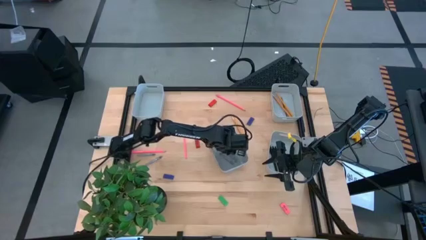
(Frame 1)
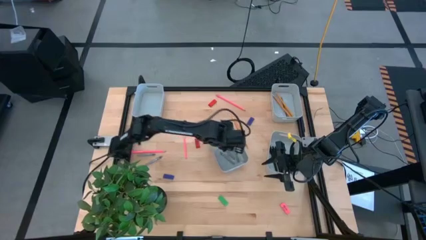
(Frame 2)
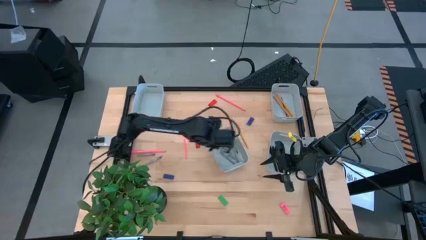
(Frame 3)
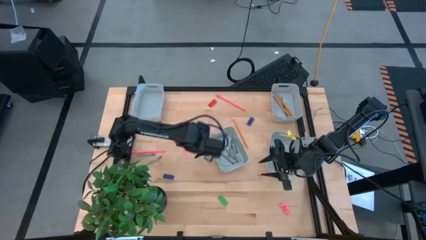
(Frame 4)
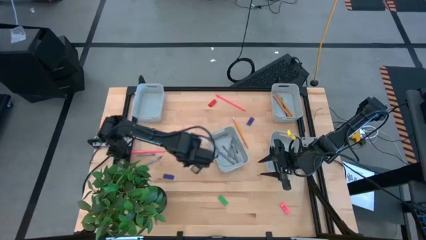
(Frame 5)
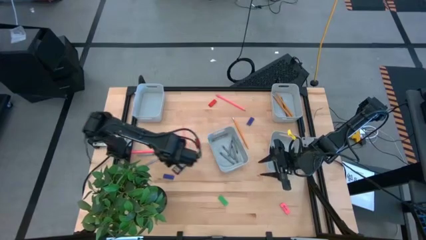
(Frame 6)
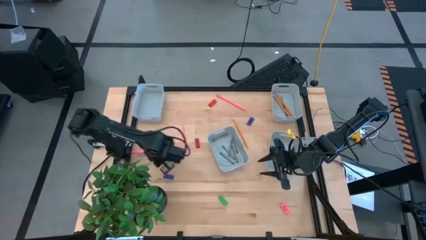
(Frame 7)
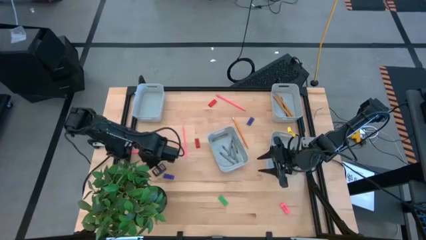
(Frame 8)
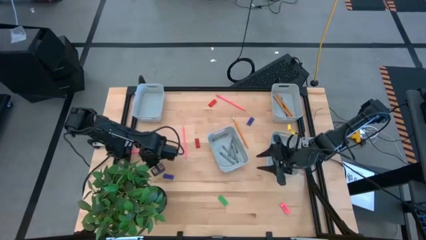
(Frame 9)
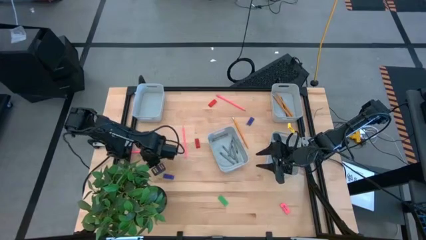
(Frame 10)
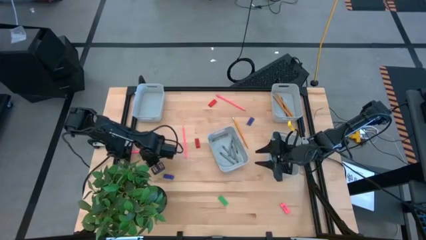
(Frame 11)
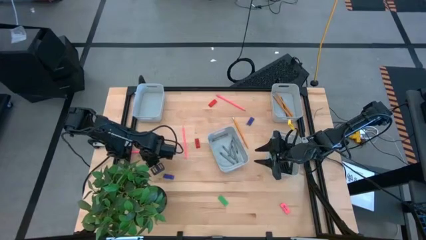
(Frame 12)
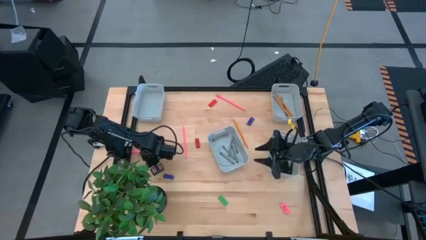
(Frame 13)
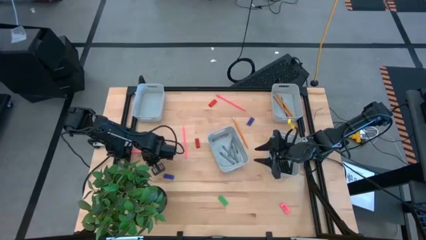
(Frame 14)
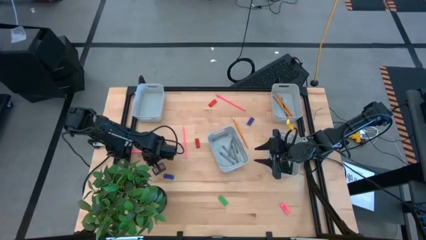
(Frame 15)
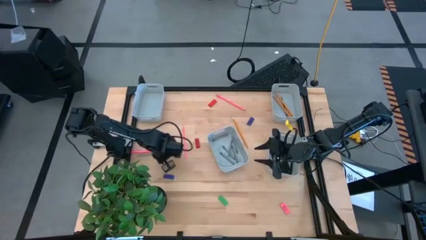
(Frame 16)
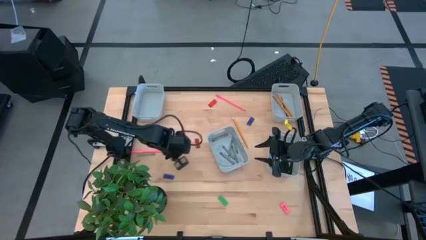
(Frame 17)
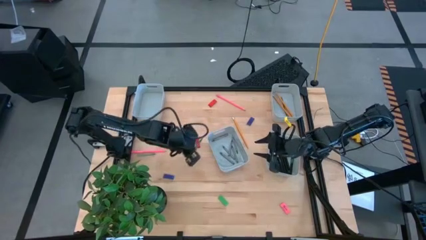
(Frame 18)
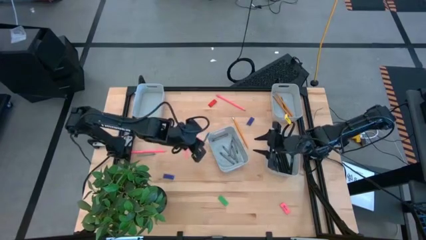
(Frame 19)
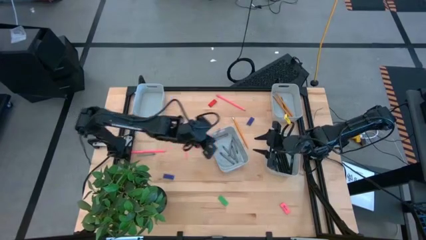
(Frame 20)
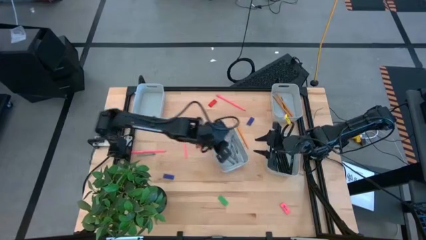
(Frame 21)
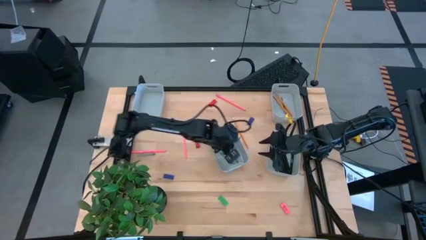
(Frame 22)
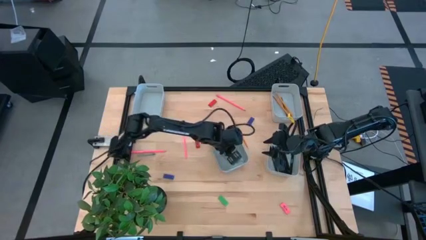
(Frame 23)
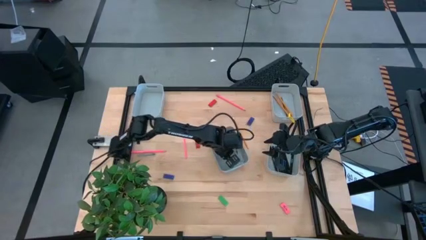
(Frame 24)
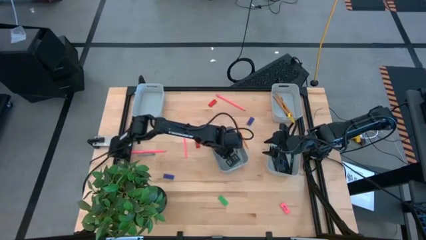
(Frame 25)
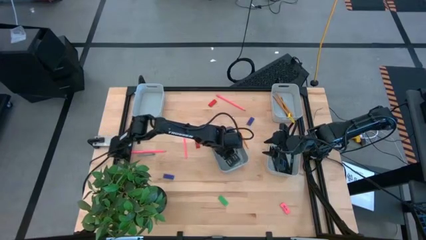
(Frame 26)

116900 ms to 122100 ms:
Task: Sort crayons/erasers/pens/pencils in bins
Put the gray crayon into the bottom left gray bin

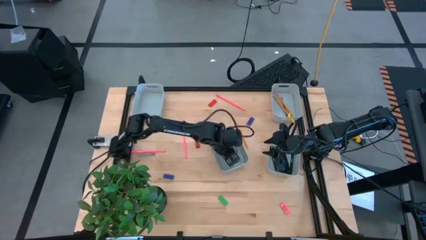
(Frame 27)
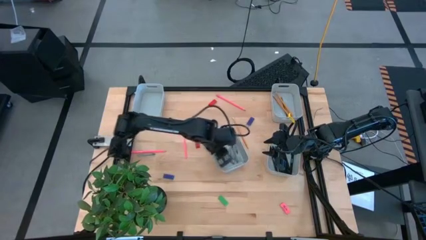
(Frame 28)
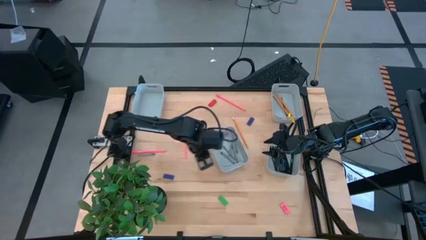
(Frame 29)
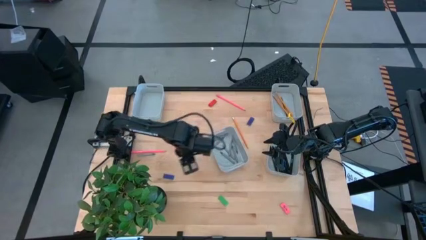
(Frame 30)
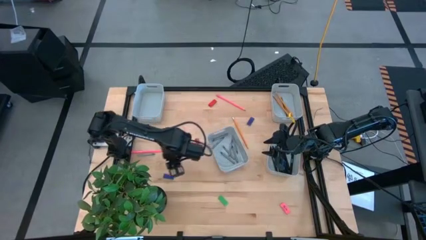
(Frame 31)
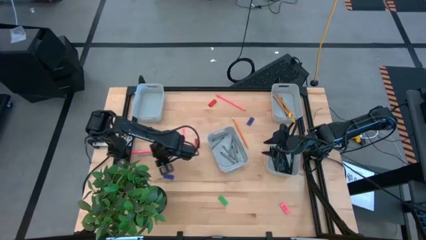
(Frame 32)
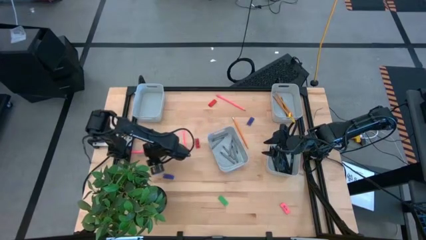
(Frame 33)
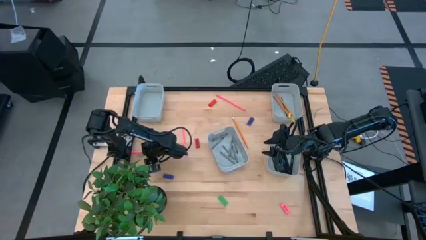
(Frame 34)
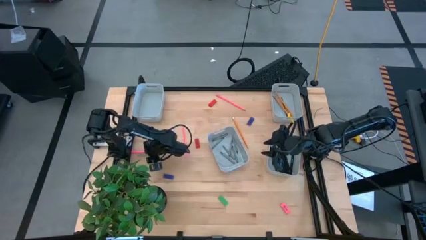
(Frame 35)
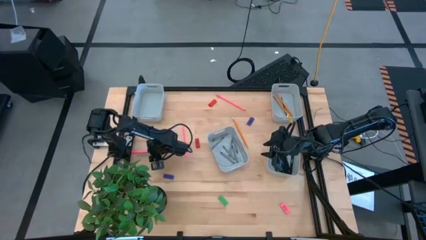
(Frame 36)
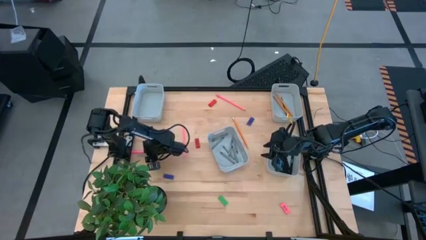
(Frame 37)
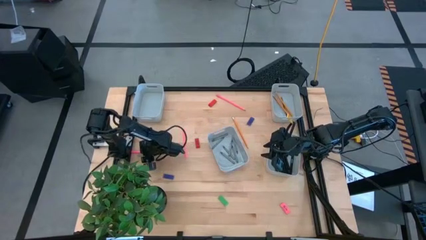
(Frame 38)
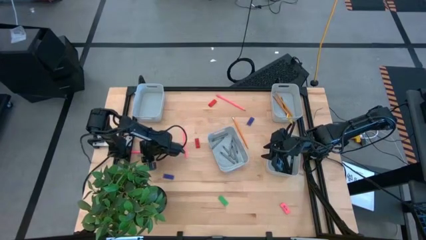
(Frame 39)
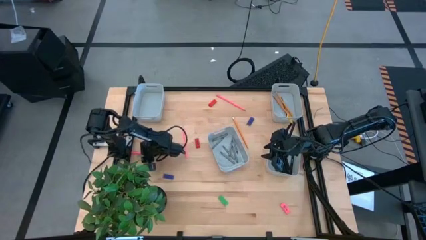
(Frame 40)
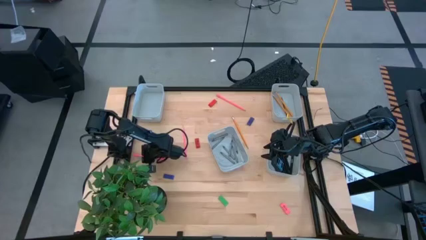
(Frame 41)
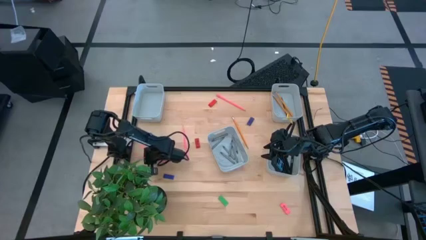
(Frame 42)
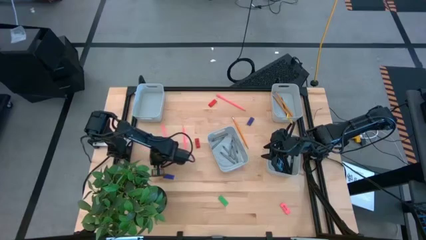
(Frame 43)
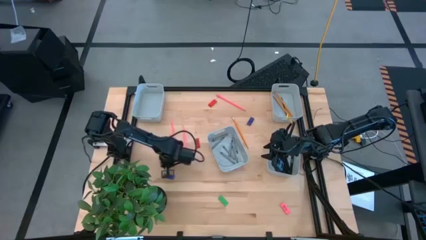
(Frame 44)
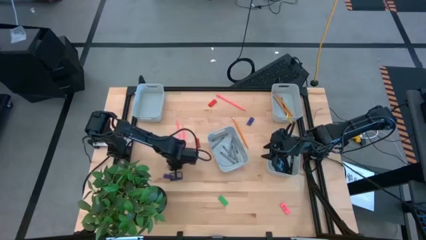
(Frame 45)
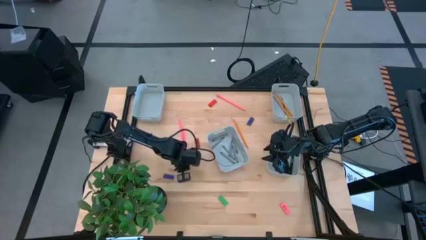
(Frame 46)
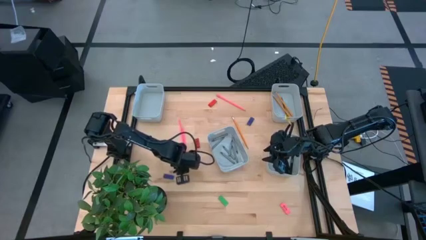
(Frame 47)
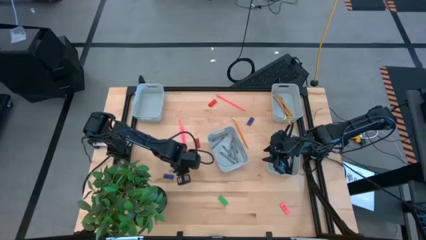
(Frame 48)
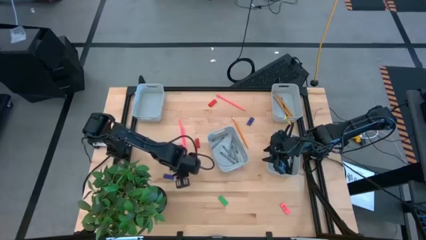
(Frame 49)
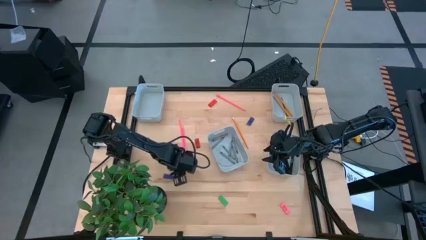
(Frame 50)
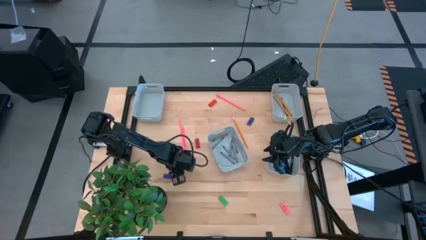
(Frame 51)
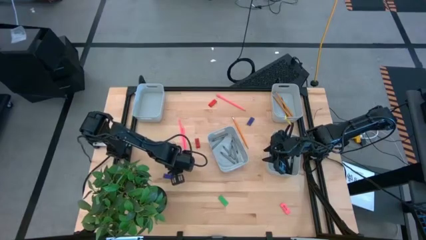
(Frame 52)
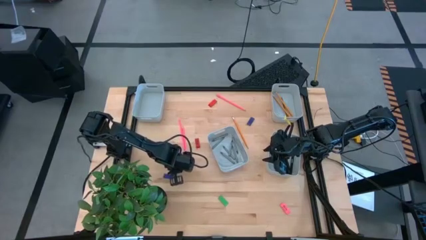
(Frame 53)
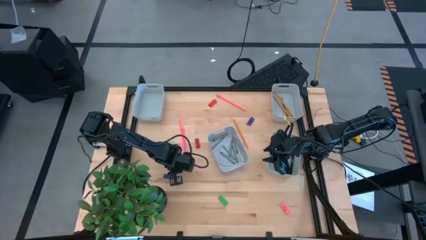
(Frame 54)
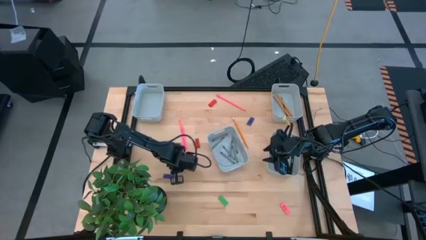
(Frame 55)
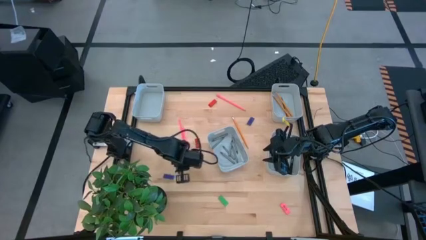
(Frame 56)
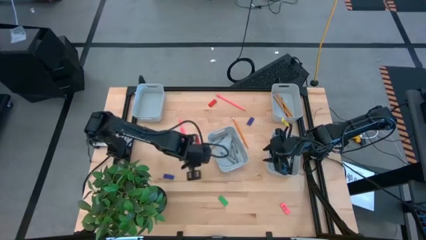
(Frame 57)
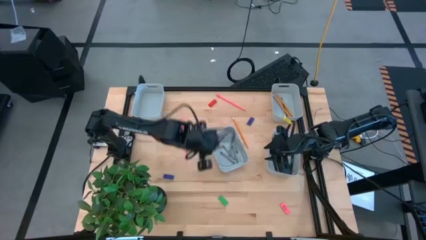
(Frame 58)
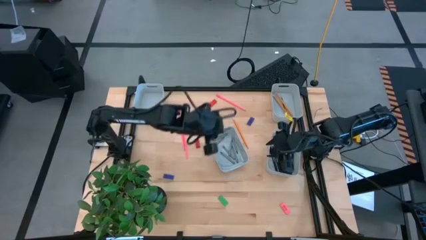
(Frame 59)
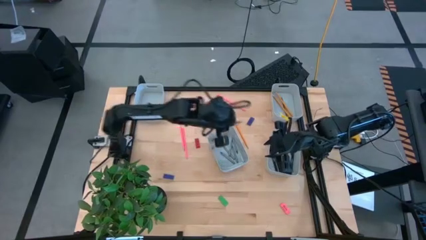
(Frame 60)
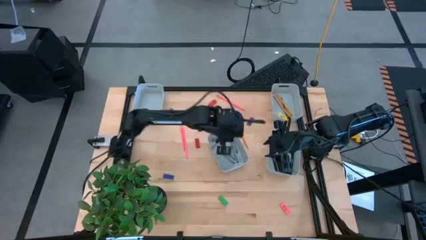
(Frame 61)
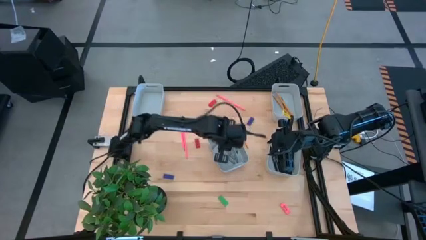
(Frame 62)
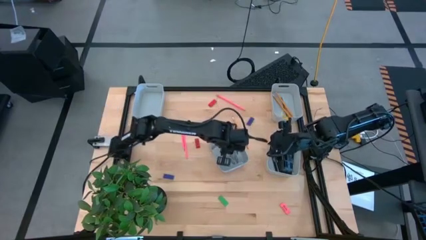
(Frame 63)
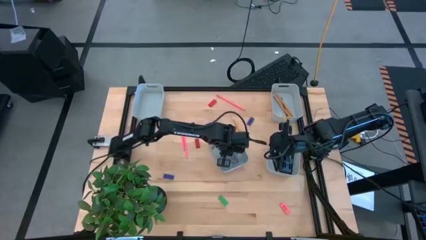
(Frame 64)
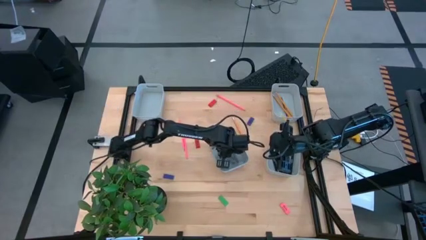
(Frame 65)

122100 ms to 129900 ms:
Put the gray crayon into the bottom left gray bin

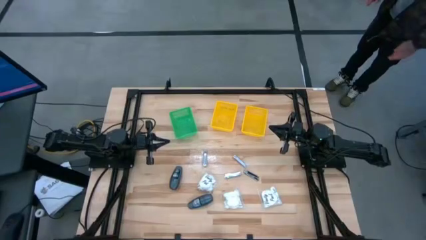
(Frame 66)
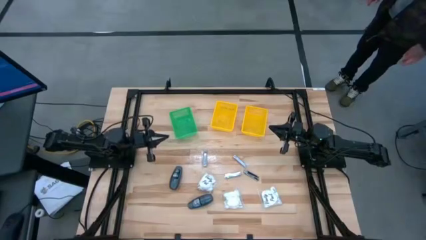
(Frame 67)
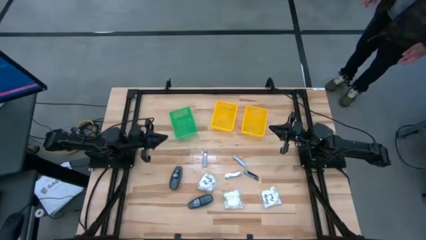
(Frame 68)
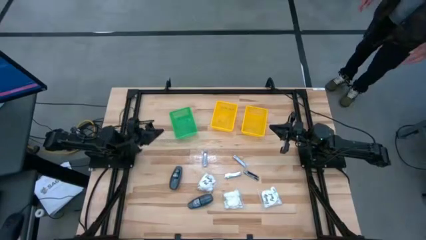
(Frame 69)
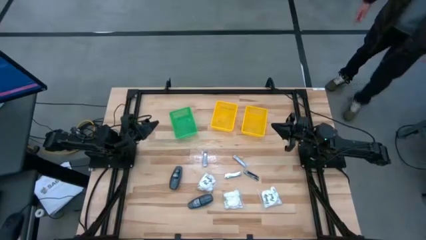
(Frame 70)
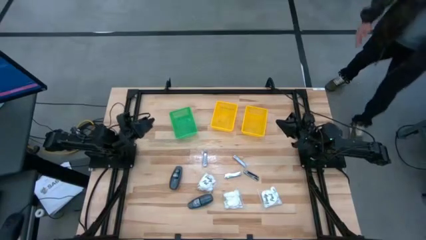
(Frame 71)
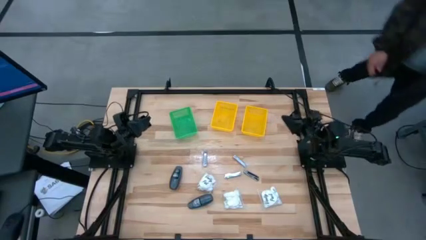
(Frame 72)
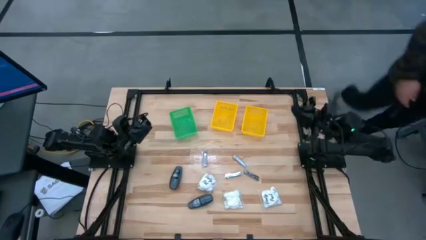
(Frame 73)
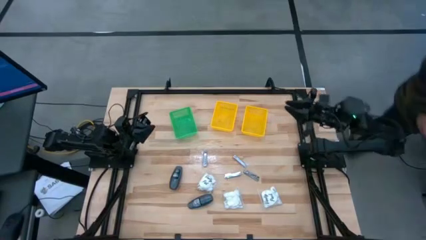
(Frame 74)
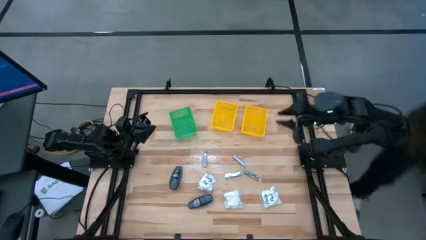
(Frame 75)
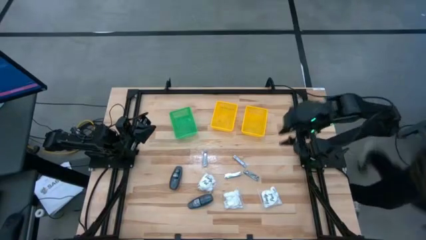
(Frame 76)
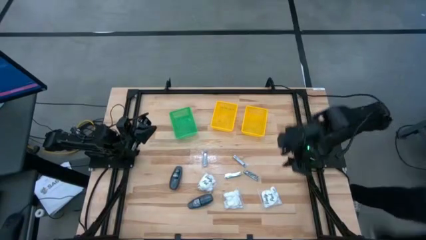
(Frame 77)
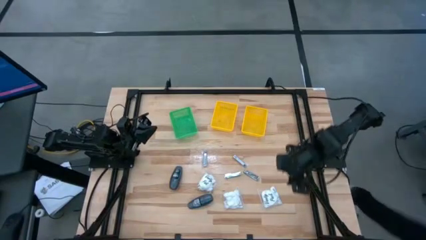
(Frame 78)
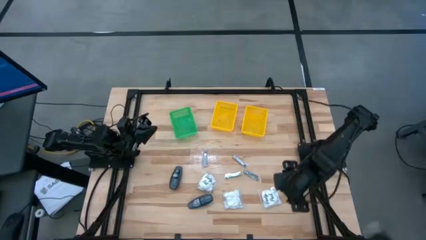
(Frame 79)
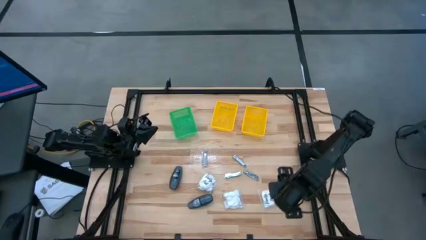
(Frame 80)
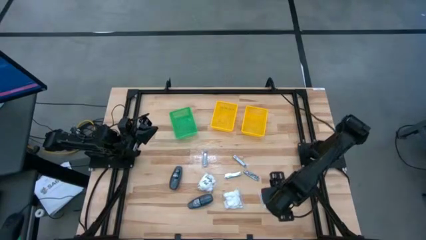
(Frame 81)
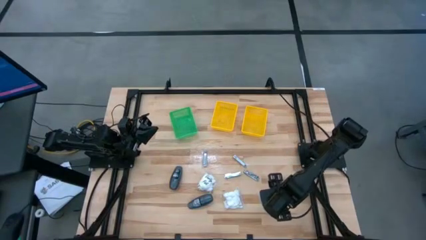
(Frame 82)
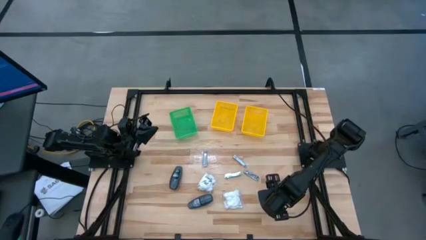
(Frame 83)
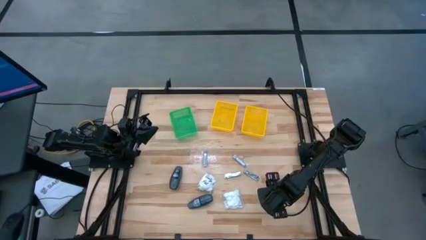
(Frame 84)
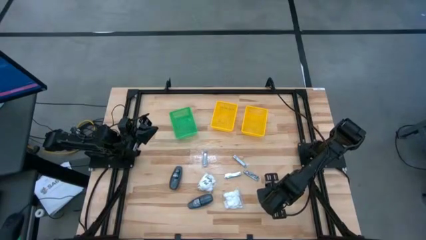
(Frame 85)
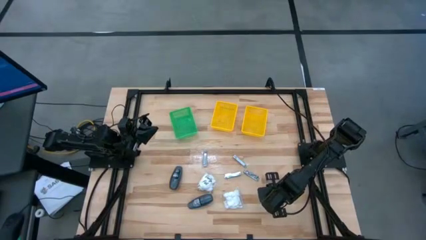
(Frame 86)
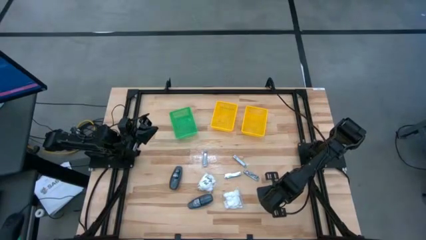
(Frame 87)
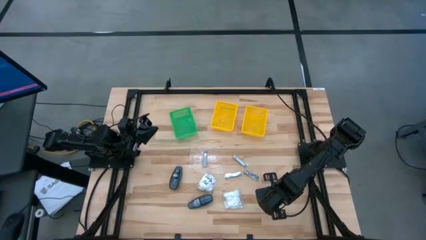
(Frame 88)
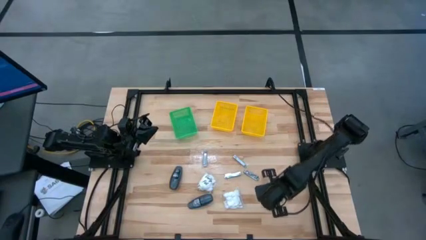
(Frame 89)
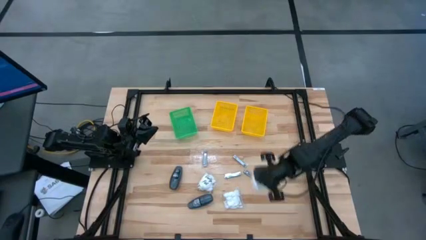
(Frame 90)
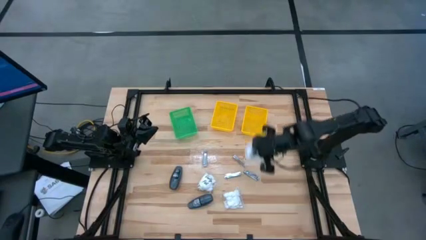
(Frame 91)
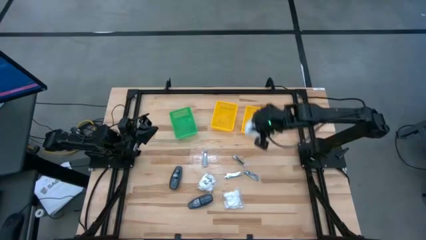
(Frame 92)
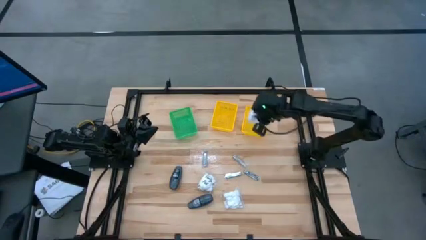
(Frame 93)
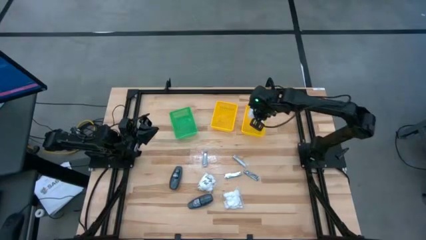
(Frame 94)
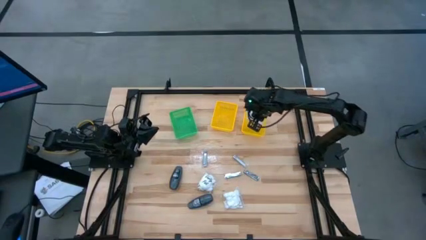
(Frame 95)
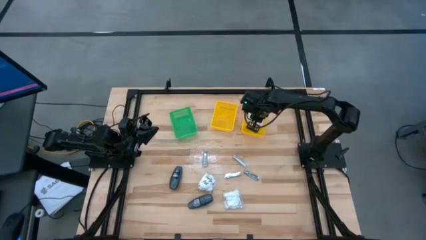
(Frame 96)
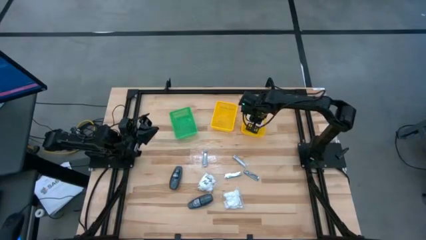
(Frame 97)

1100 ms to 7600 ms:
Task: Pick & Place Travel size toiletries
Put the white cotton pack into the right yellow bin
